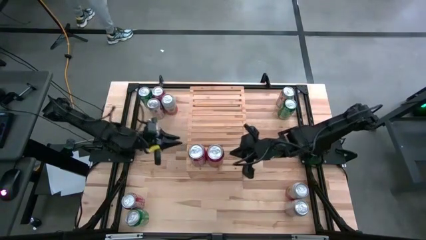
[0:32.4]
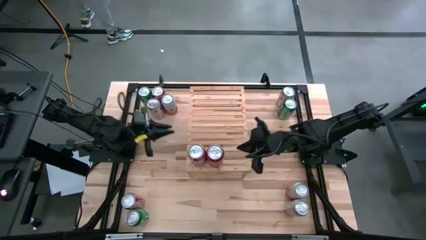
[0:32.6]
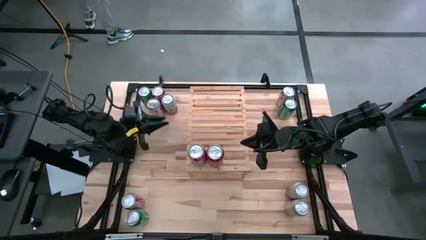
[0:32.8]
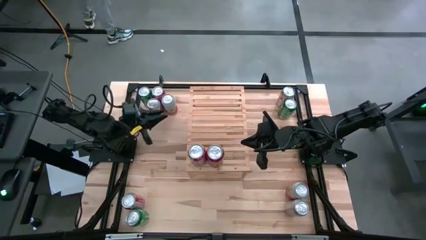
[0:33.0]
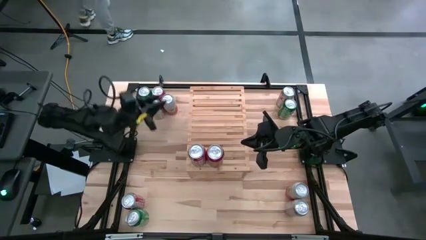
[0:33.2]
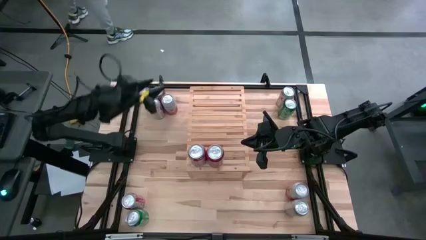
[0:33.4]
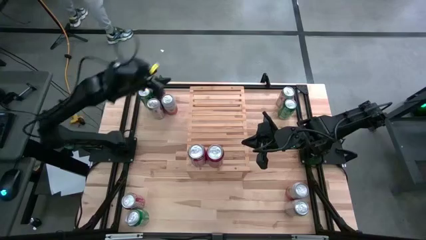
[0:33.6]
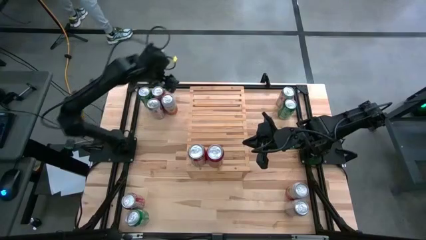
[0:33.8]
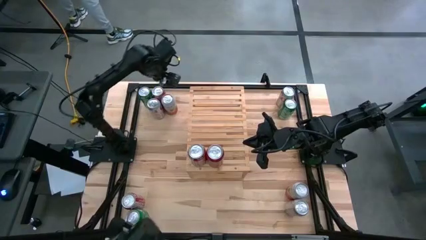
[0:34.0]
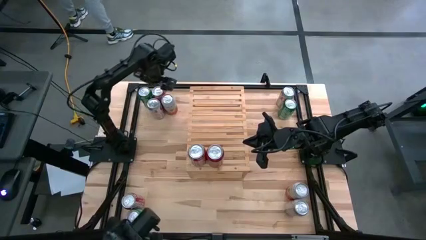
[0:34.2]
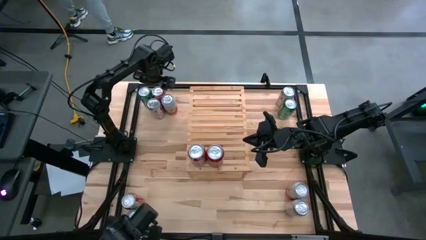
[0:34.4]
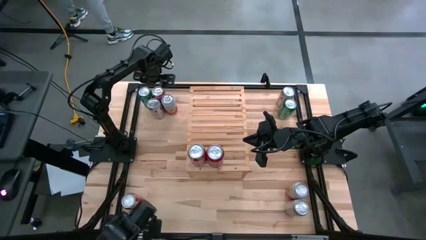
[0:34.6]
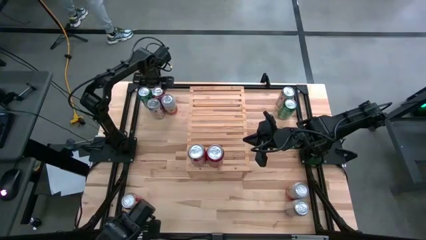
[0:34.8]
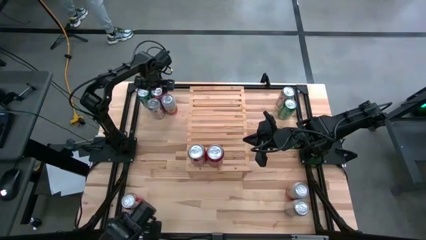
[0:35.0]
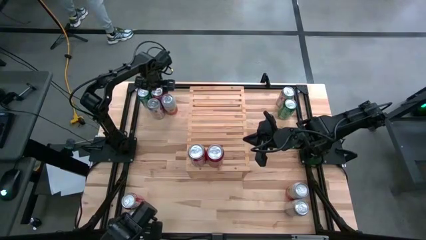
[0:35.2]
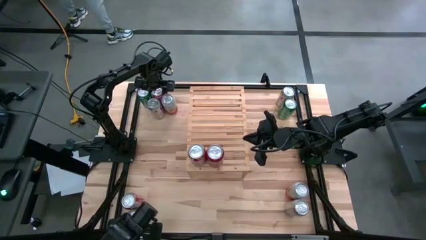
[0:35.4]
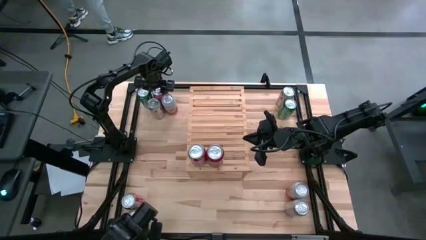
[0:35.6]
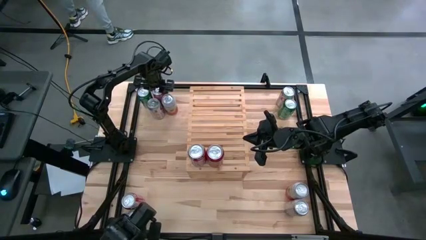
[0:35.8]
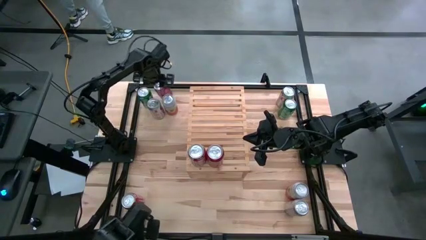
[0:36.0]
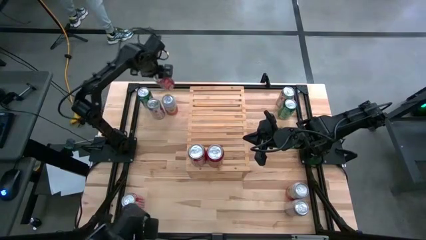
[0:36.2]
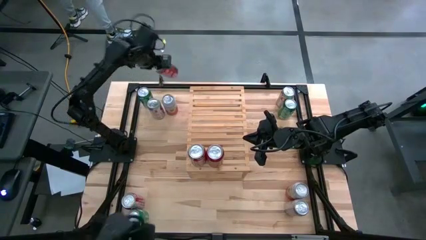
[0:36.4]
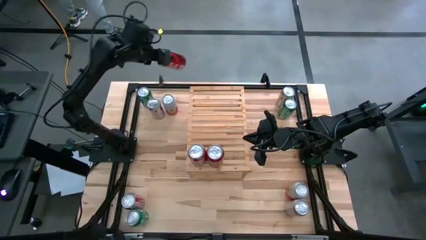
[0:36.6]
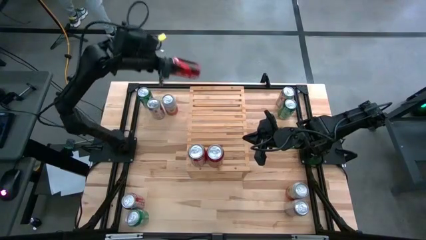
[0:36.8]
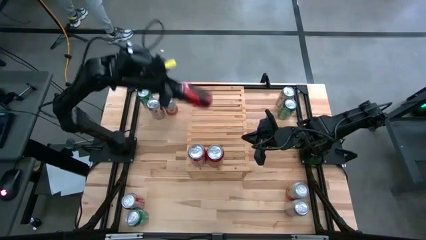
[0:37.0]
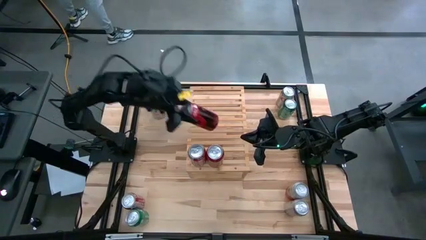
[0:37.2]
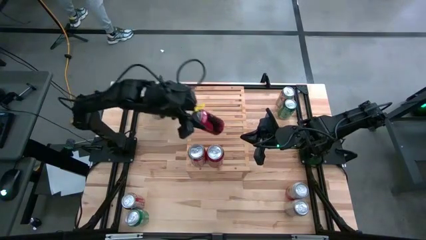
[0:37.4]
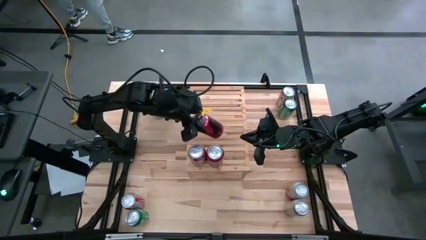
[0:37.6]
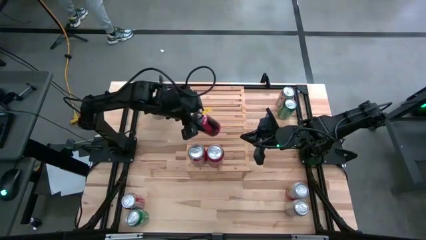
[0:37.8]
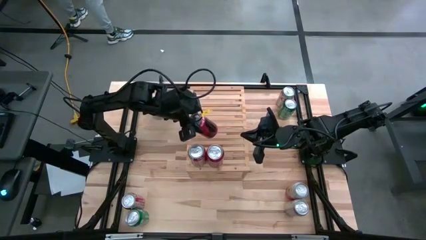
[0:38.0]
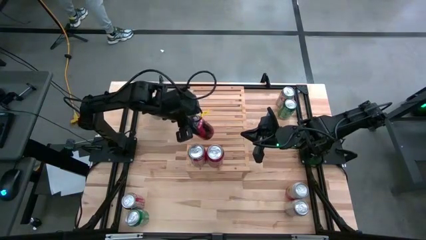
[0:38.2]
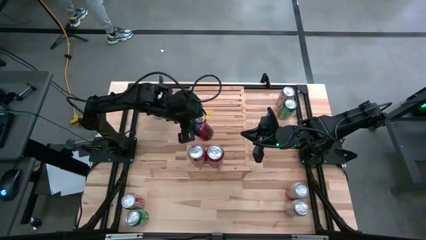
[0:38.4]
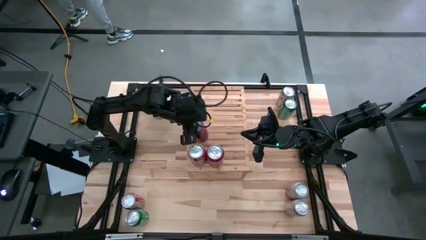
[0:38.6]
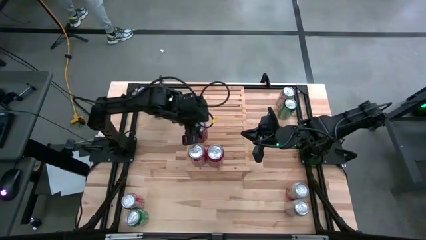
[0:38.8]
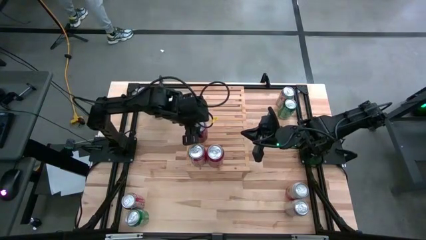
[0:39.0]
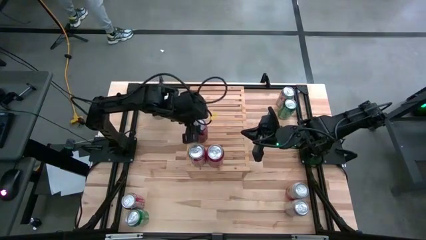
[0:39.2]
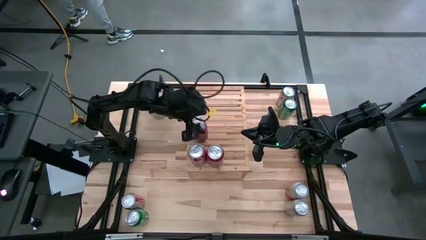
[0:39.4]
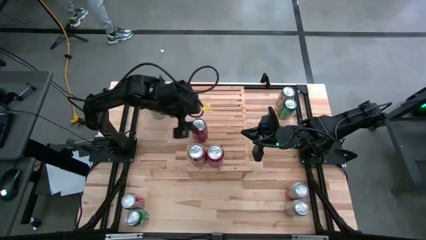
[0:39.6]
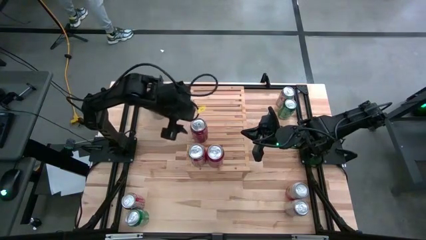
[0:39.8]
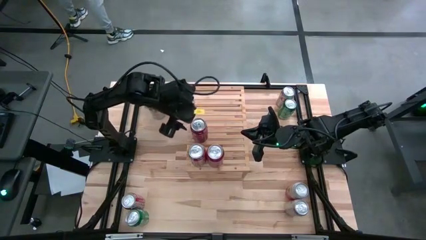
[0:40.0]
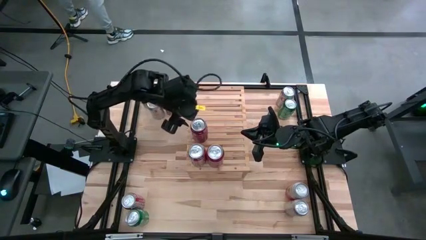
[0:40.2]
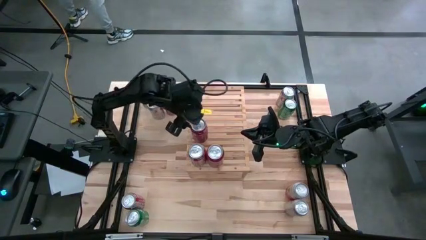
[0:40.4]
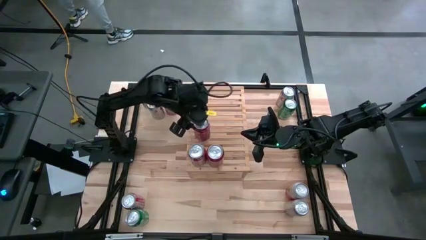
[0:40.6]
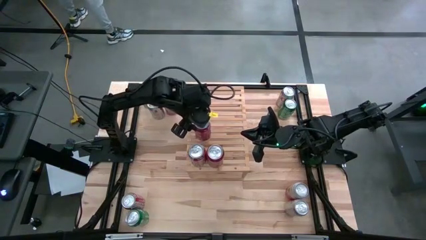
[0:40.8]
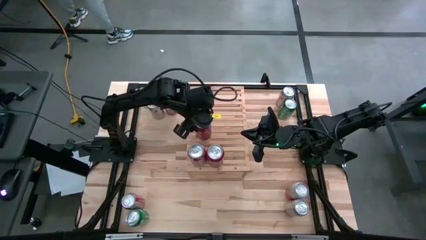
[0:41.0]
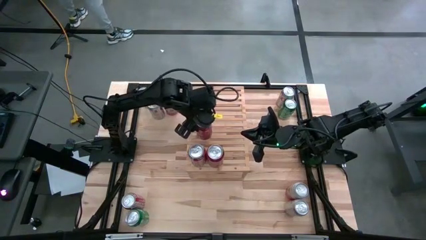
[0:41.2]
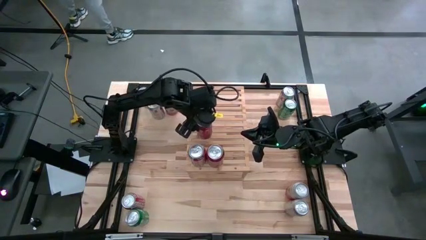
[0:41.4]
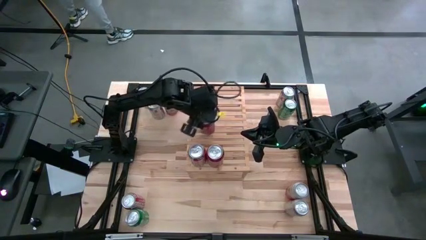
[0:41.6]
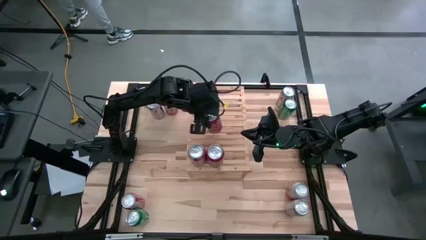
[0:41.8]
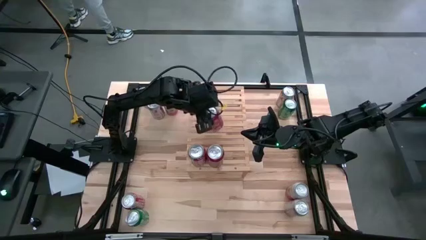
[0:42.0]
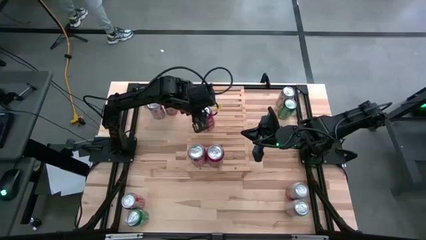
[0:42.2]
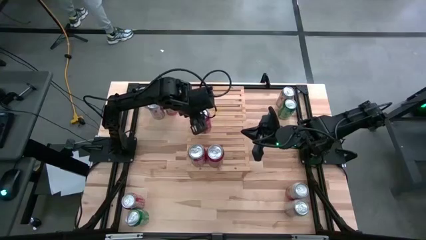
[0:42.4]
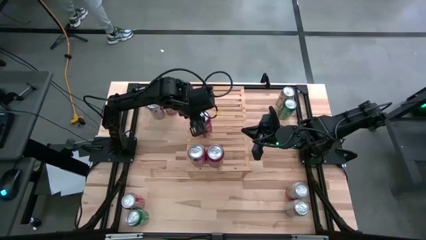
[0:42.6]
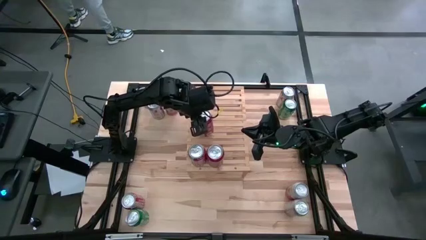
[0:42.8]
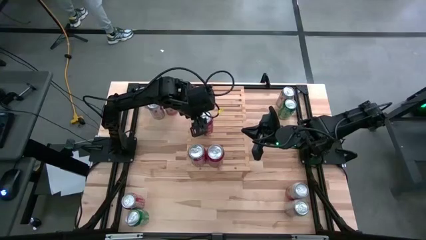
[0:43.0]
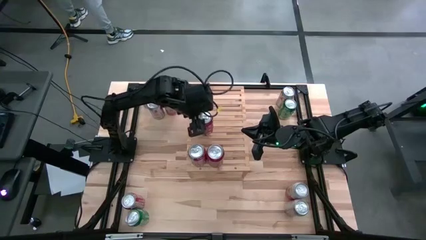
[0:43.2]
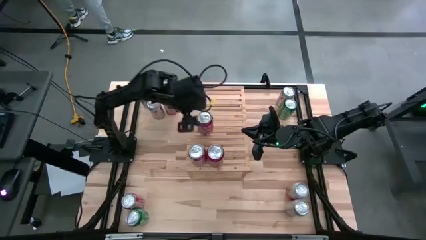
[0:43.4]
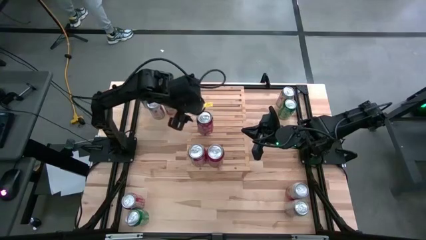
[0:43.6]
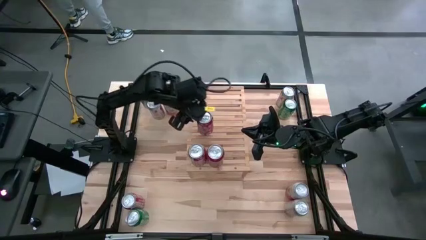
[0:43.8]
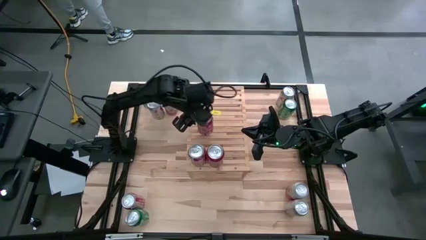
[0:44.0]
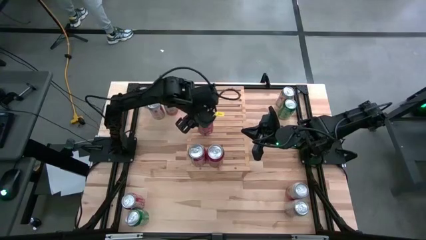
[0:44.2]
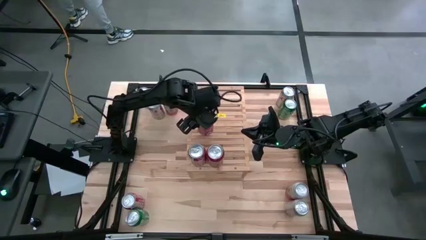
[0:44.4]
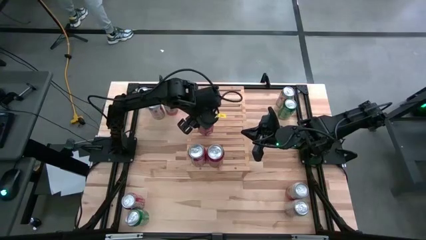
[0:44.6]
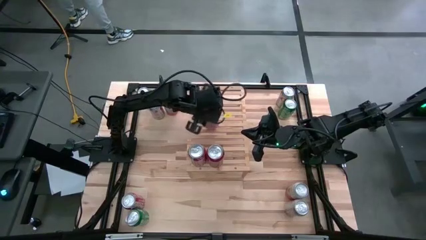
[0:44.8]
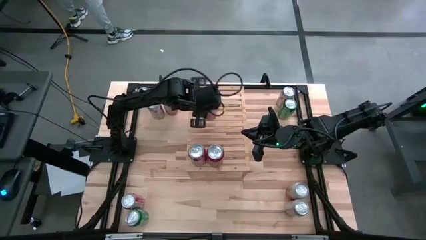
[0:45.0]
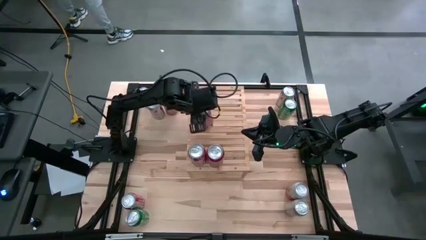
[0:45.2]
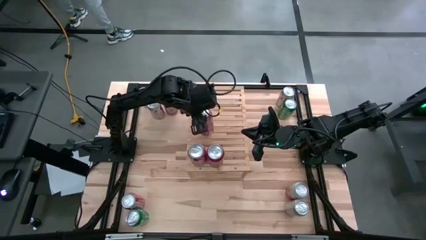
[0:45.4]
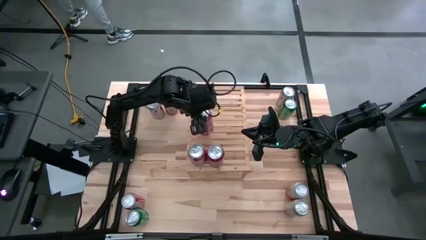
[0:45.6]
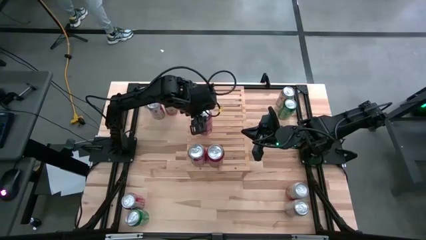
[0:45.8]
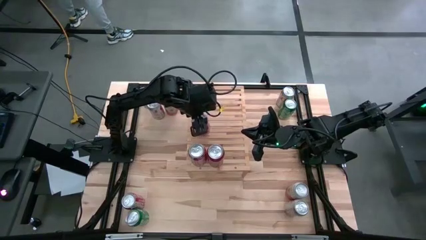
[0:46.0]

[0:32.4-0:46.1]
Task: Place canned beverage on shelf
Put the top red soda can on the shelf aligned with the other red soda cans
